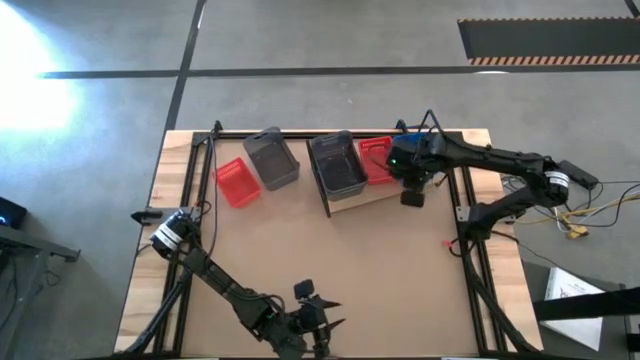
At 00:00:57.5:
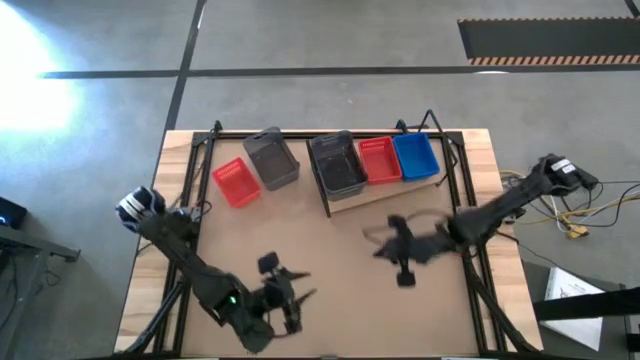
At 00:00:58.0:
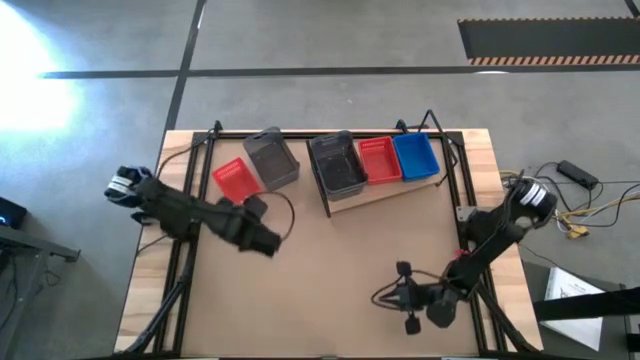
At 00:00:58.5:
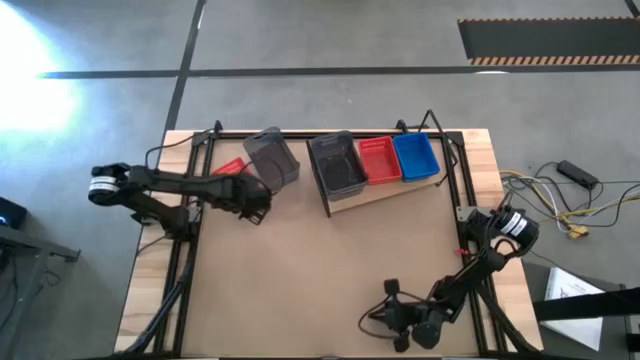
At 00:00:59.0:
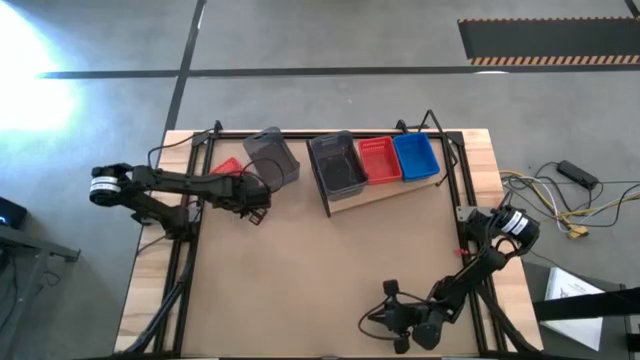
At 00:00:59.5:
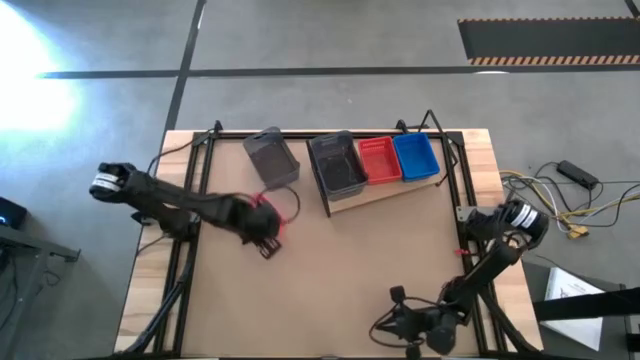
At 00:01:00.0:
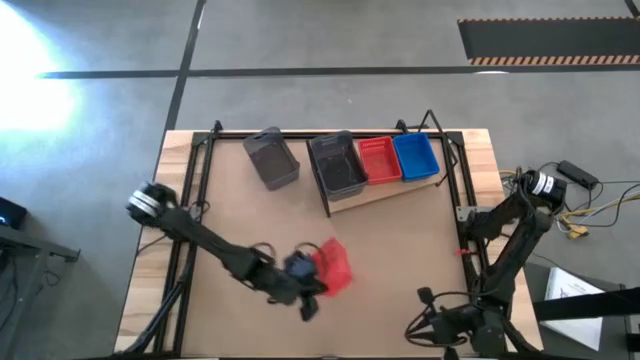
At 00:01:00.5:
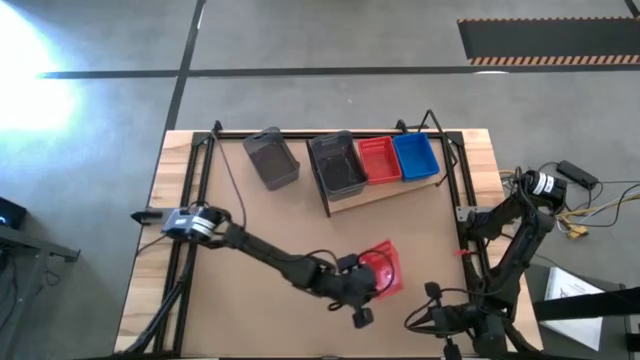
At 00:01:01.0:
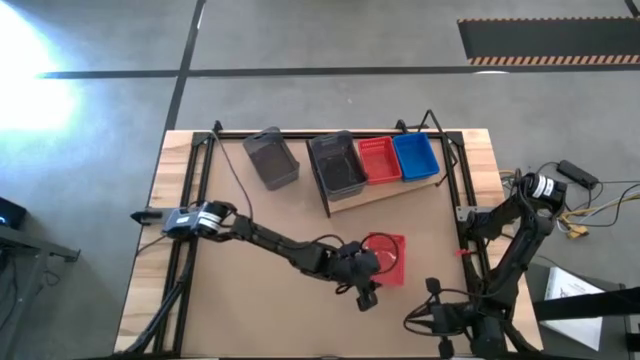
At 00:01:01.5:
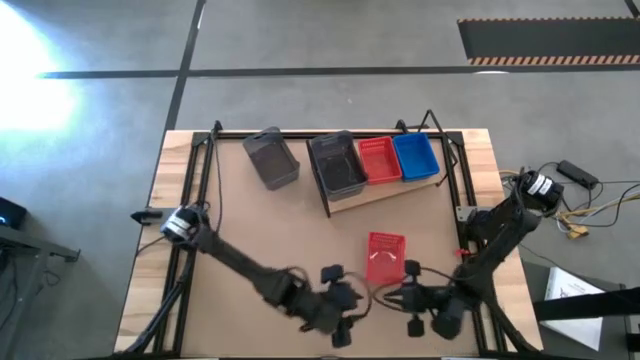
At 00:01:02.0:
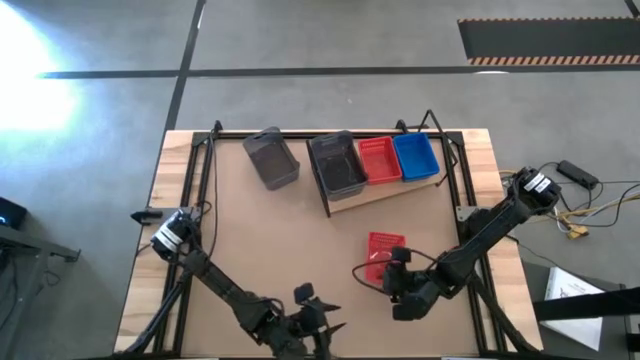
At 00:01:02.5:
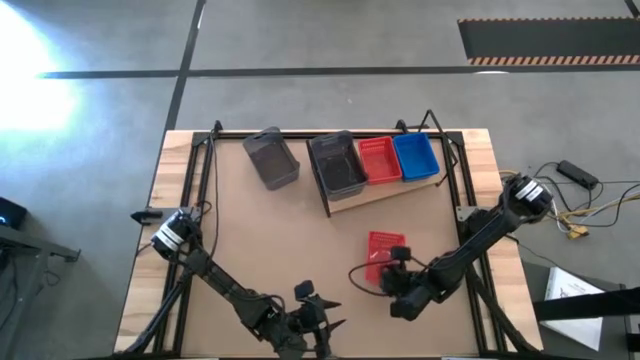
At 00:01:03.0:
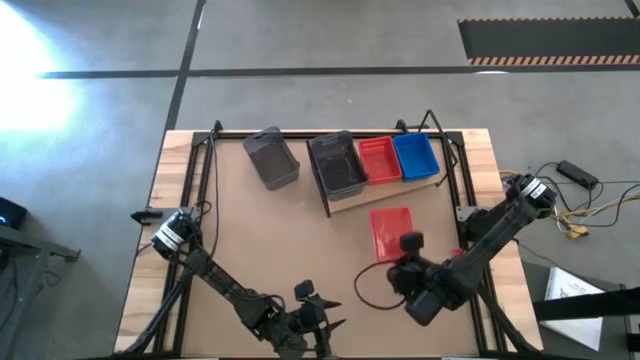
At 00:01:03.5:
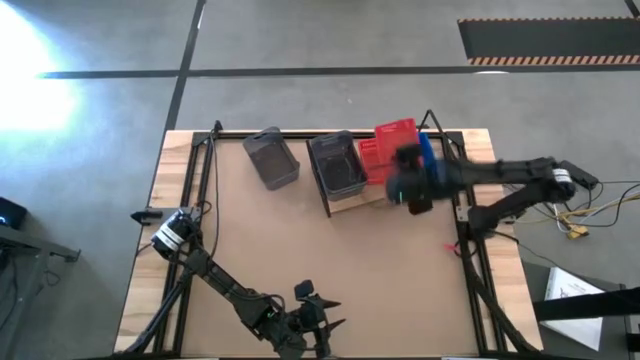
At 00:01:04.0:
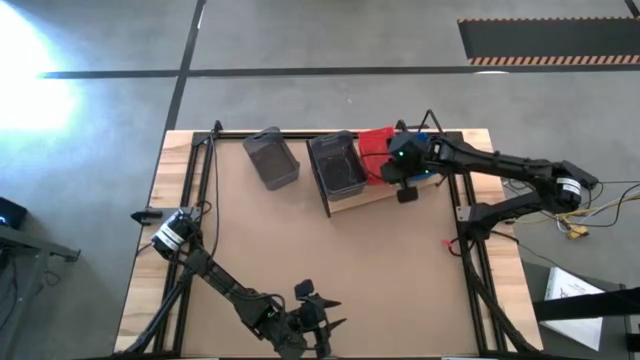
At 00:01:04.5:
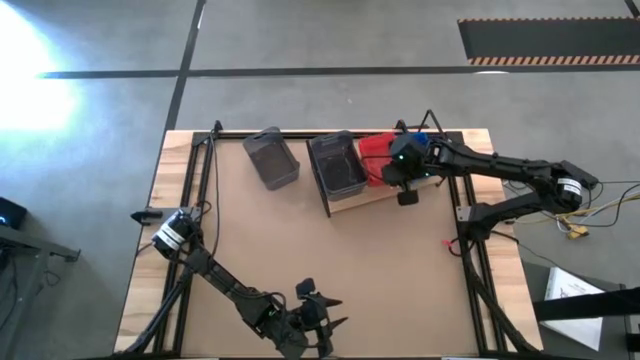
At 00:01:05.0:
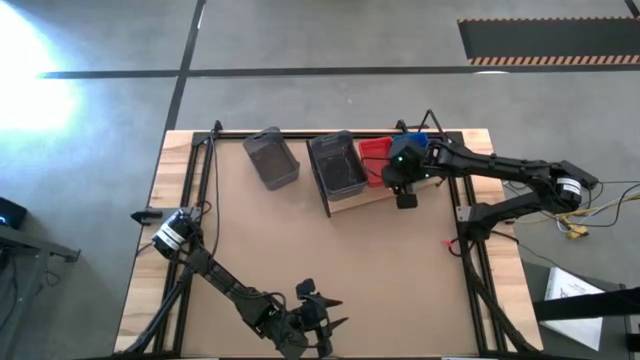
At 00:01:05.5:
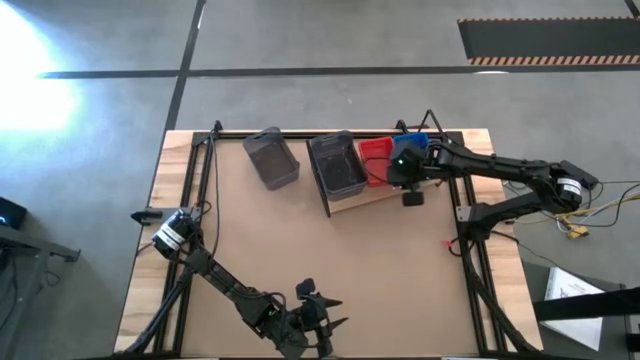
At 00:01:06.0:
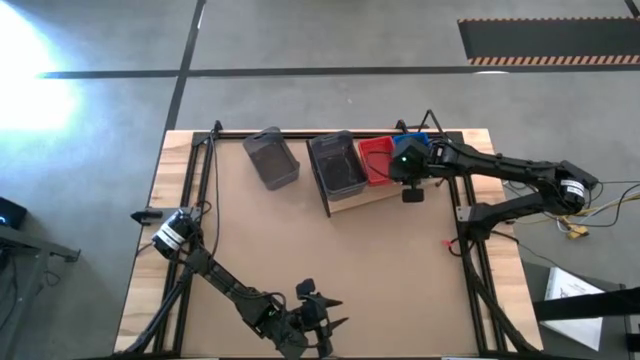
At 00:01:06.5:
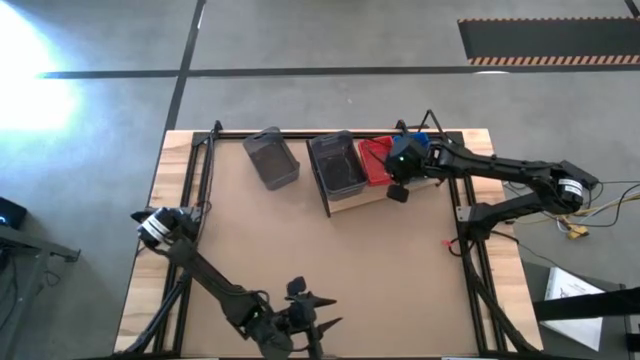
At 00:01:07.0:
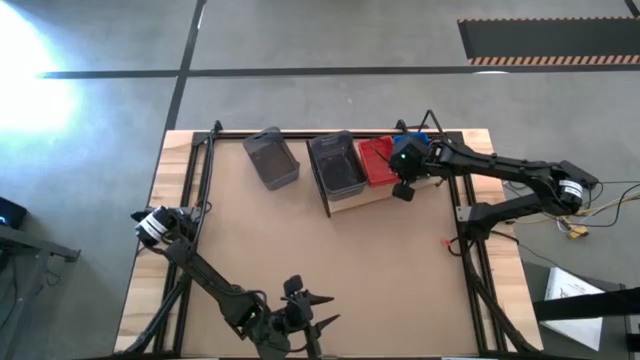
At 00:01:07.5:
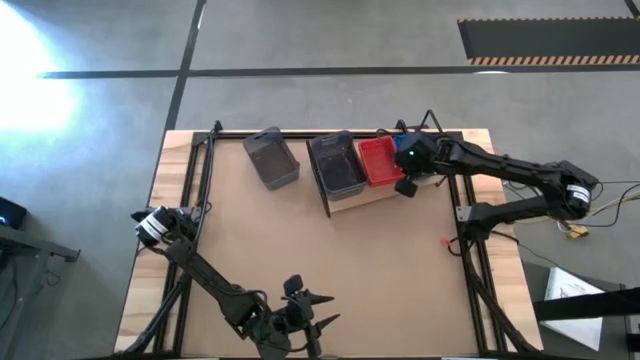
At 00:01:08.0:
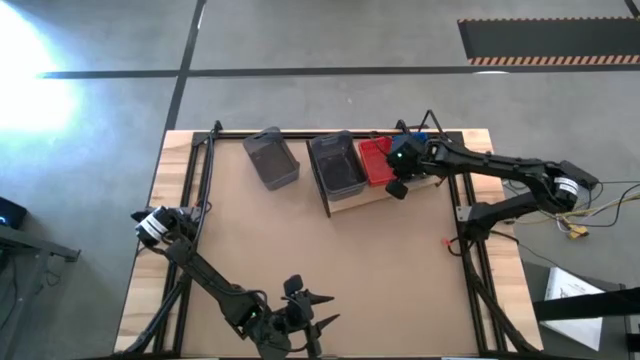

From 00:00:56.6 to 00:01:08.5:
Task: Stack baskets on shelf by color
Stack the red bin on the other red bin on the shelf

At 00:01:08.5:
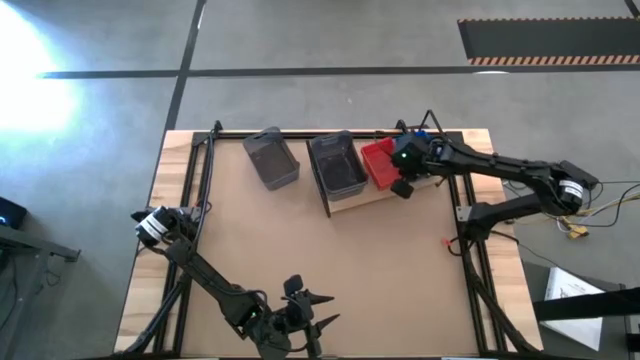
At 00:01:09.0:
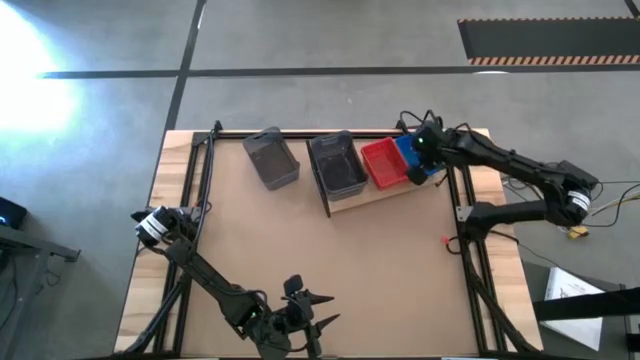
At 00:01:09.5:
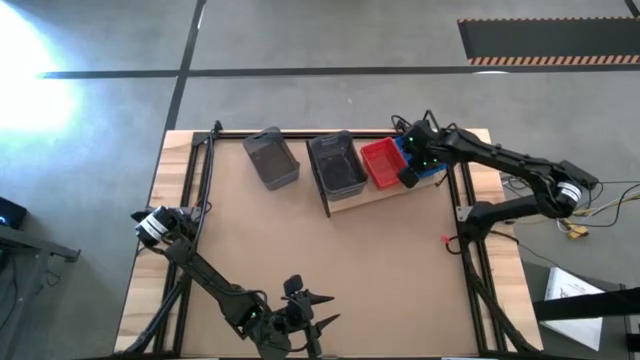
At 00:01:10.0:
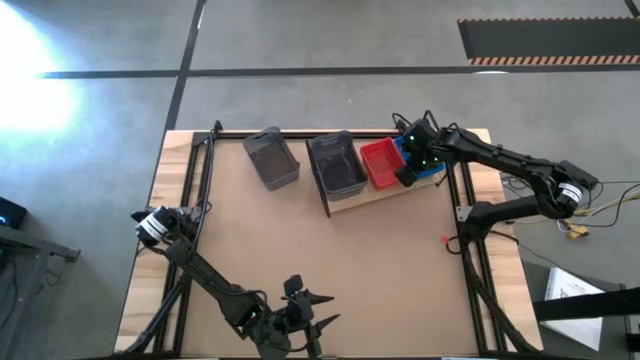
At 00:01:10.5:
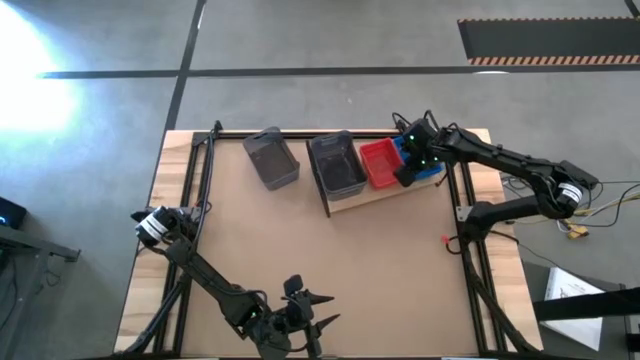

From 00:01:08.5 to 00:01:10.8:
Adjust the bin on the shelf

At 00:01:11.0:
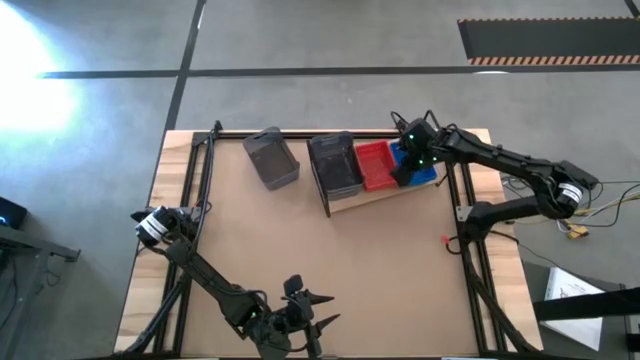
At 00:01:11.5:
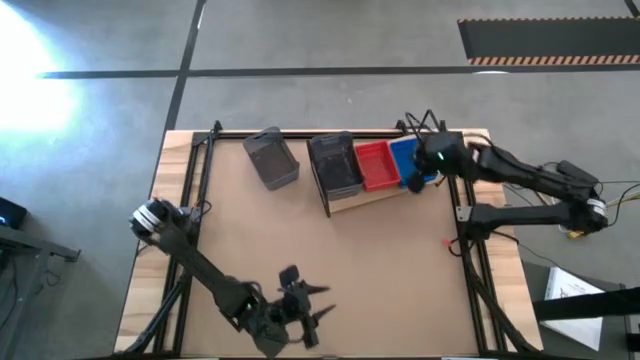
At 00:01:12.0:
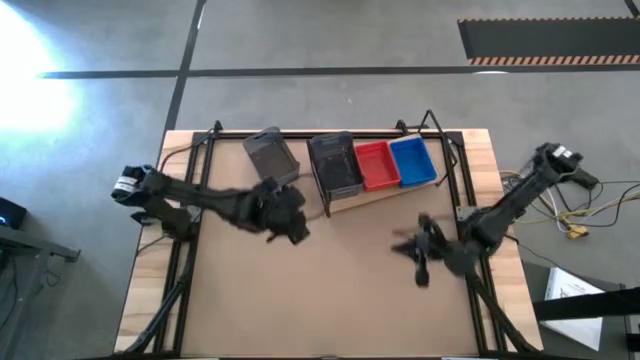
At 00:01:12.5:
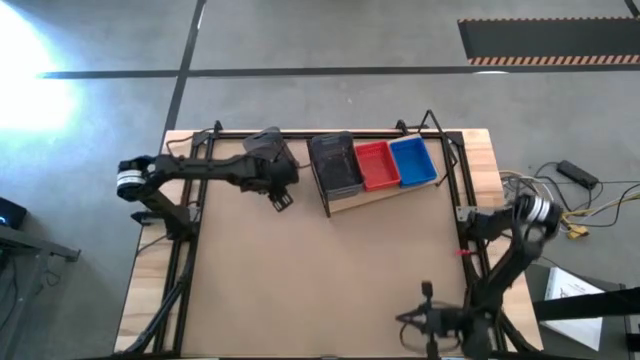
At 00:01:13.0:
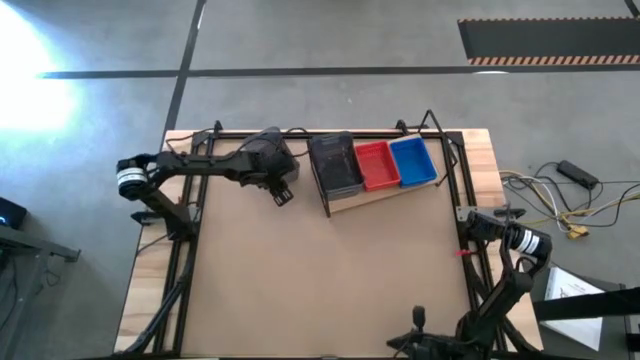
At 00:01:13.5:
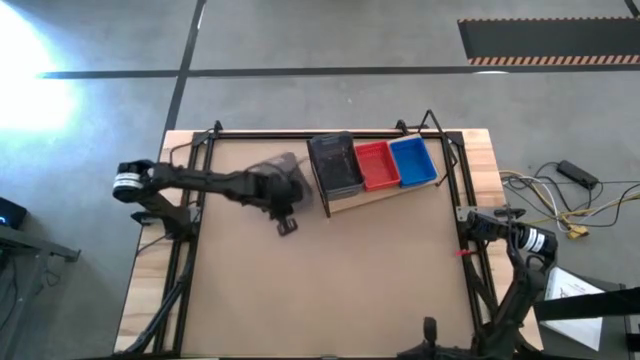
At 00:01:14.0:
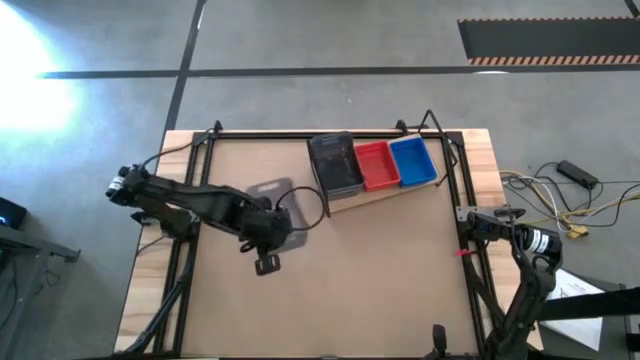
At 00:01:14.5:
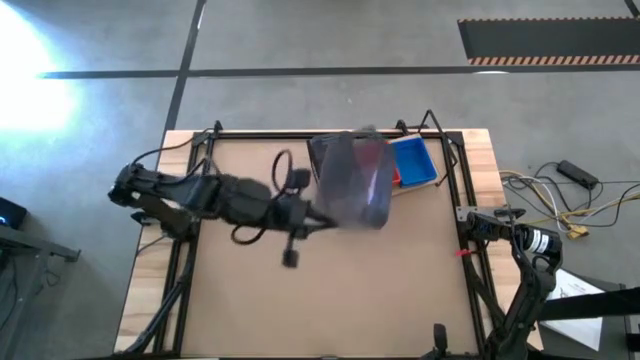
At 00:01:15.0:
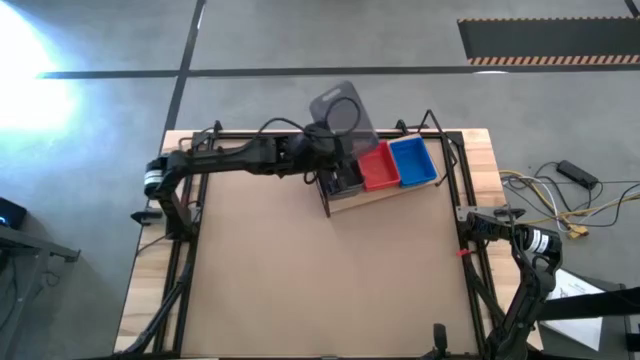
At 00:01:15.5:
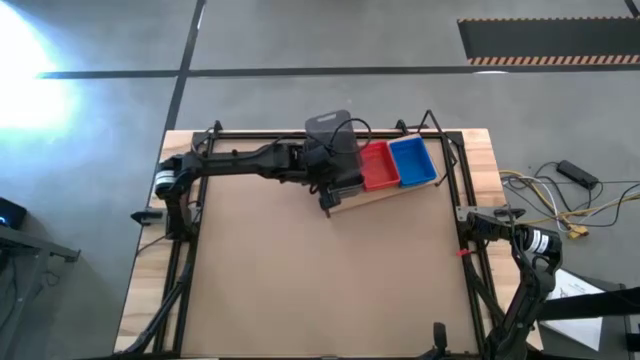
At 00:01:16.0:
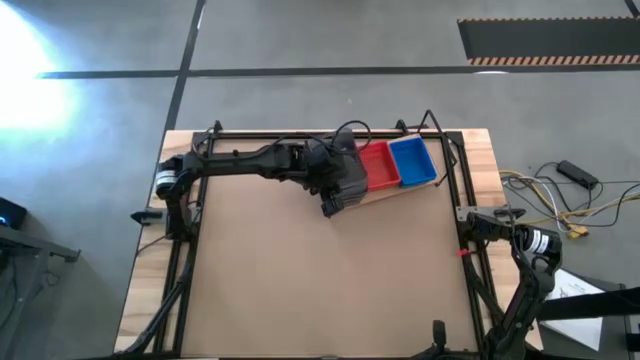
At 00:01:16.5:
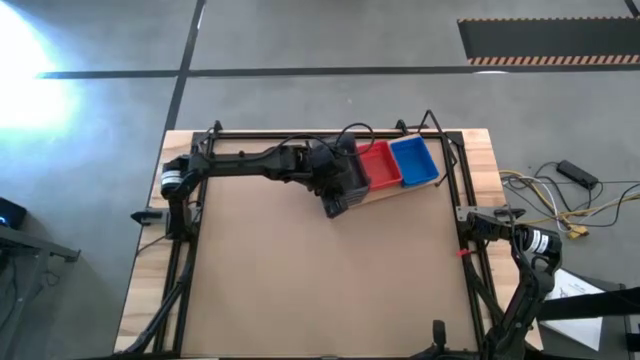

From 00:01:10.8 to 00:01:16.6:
Stack the black bin on the other black bin on the shelf
